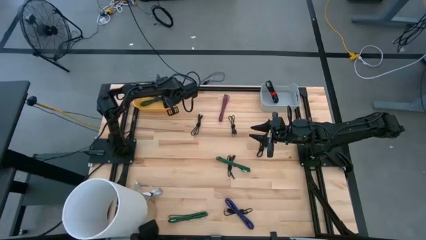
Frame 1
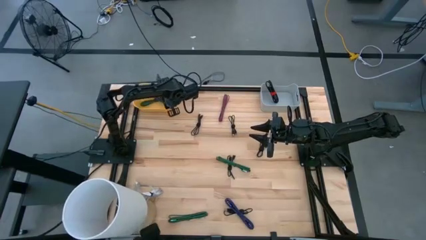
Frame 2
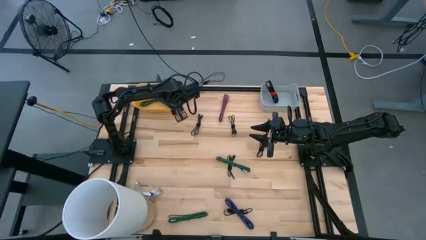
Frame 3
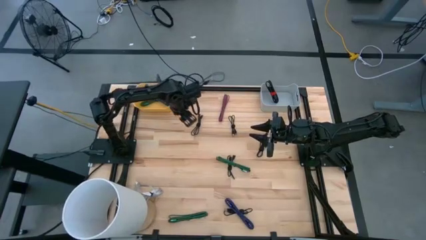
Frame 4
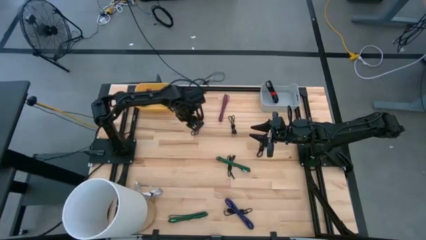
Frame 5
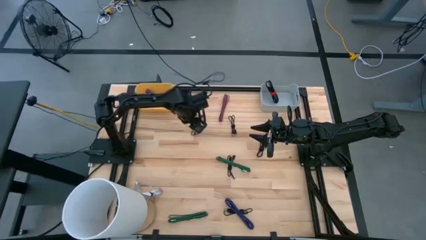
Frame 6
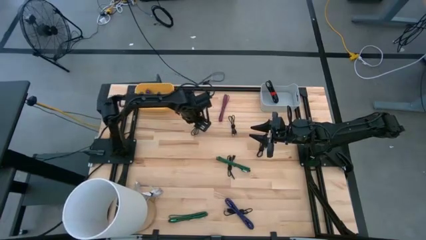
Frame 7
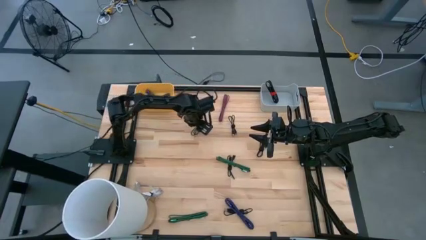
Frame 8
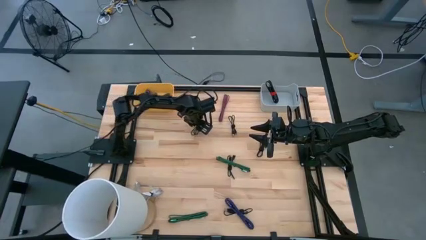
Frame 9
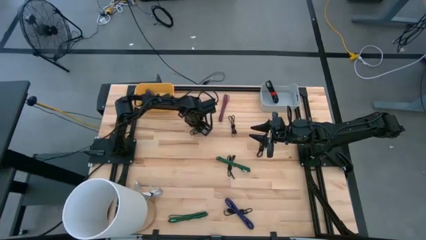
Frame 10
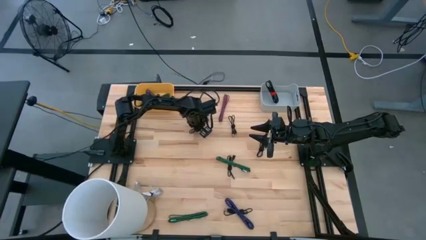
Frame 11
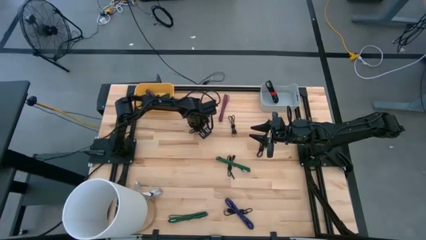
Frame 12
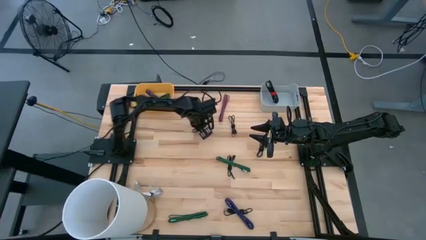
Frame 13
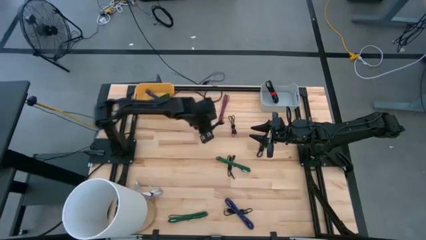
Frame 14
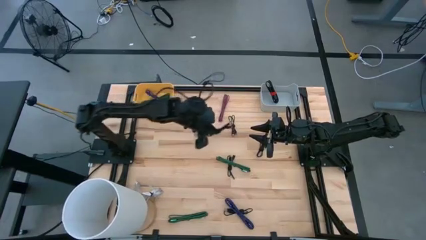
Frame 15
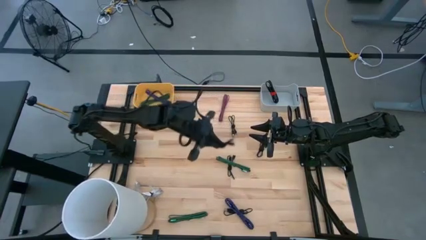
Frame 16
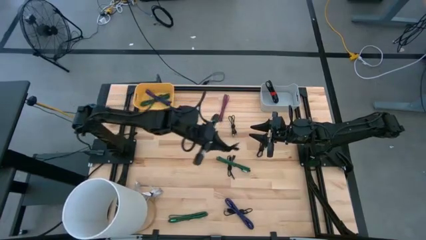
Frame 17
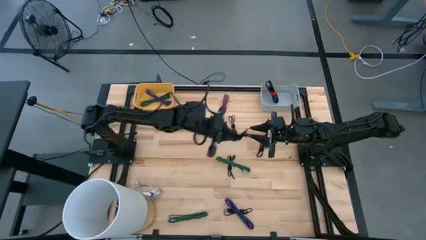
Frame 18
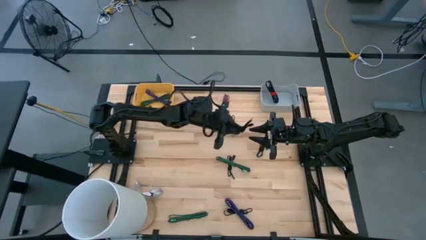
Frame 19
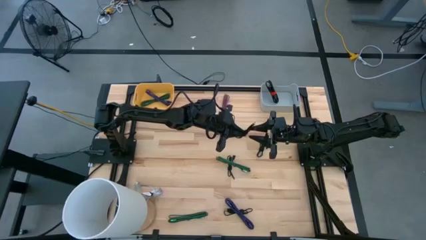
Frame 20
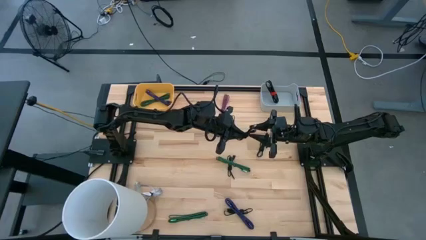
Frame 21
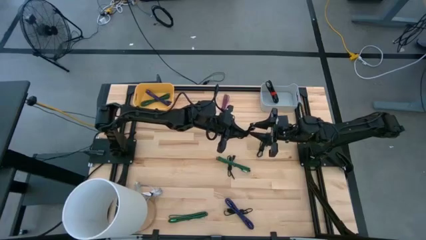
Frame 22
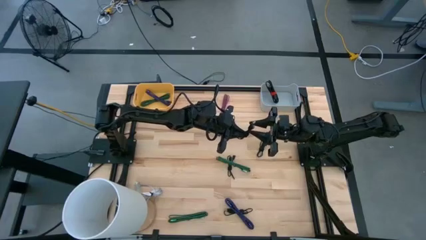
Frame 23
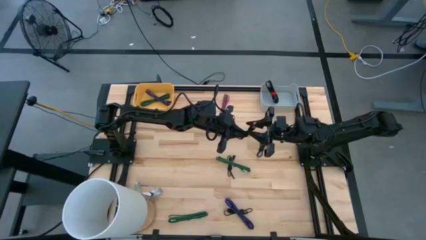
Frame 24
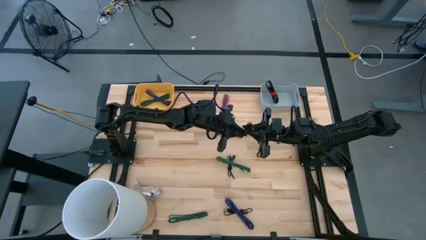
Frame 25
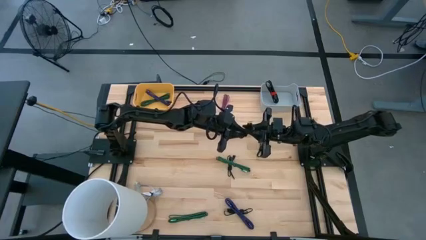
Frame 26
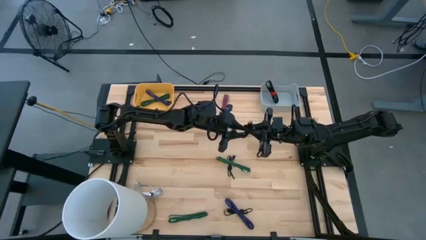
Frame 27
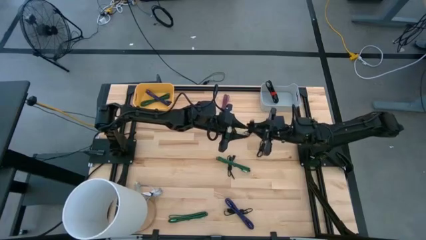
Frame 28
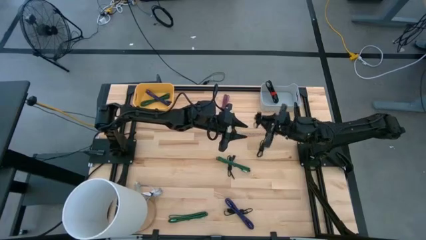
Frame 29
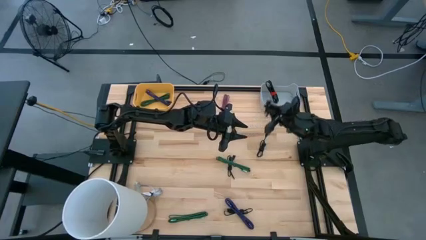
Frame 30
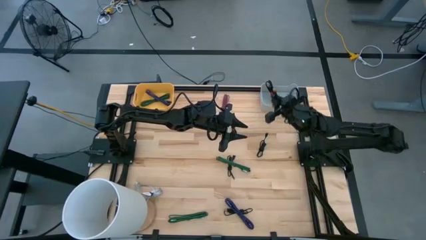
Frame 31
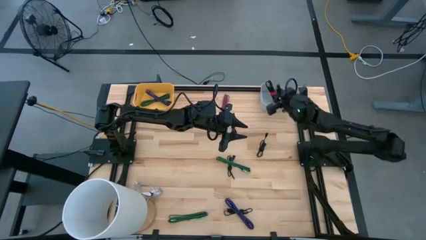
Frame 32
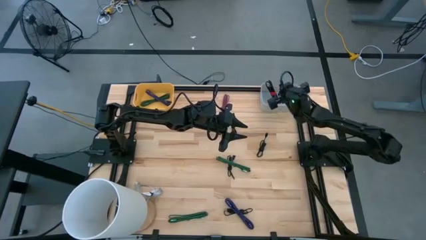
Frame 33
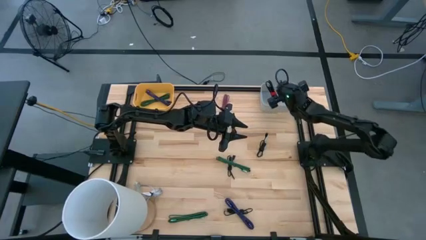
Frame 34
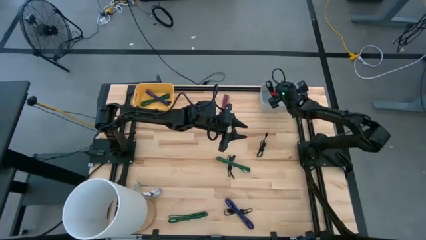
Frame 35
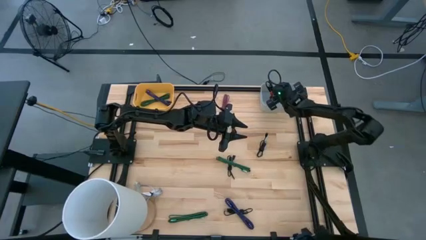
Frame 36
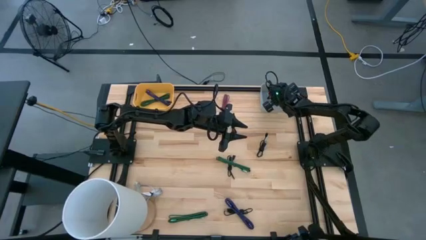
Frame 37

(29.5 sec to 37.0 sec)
Task: Pick & Place USB Port
Put the black charger cable into the gray bin

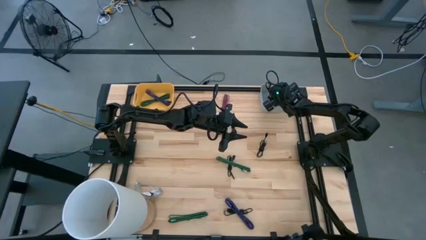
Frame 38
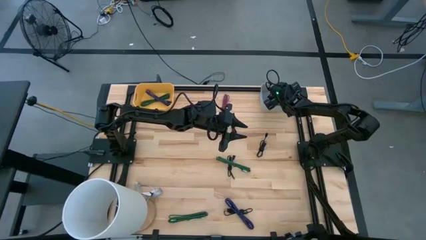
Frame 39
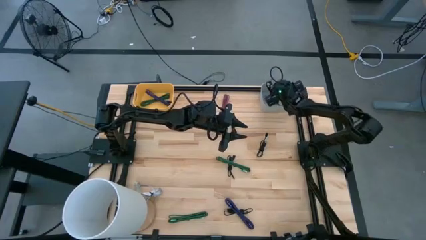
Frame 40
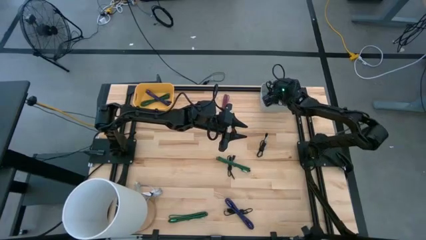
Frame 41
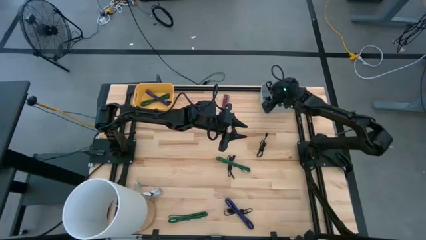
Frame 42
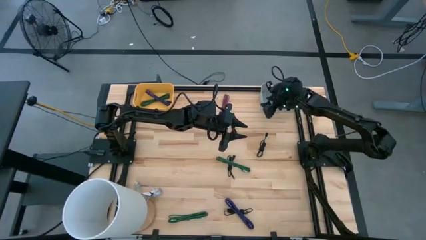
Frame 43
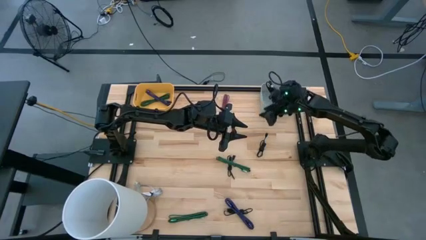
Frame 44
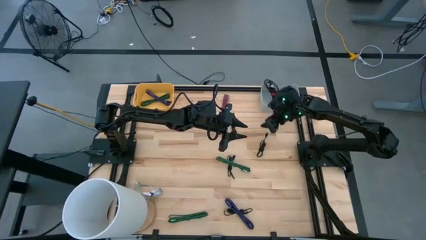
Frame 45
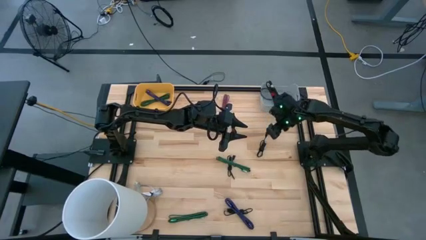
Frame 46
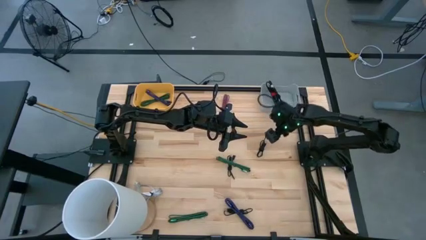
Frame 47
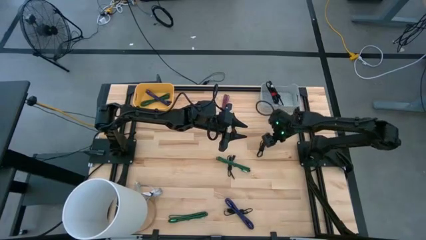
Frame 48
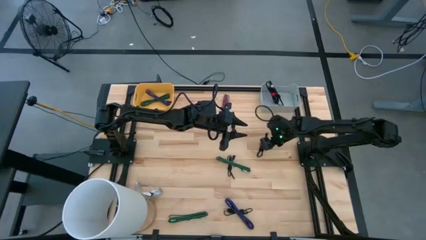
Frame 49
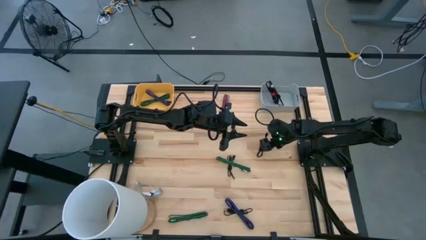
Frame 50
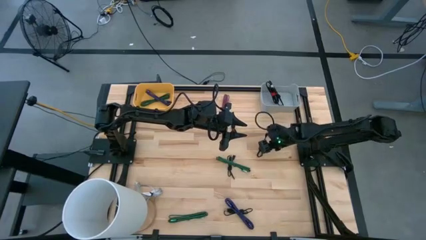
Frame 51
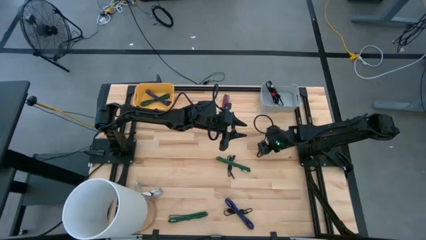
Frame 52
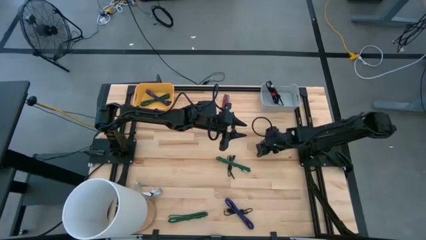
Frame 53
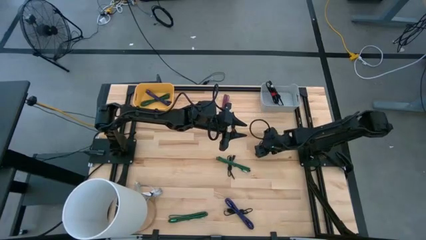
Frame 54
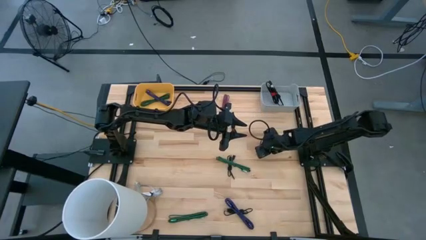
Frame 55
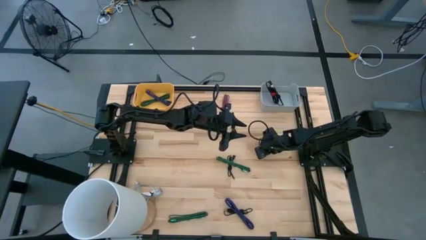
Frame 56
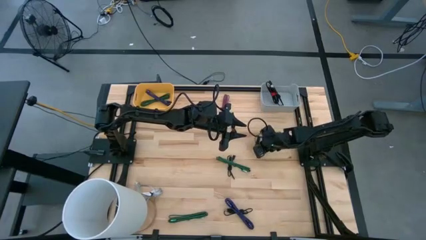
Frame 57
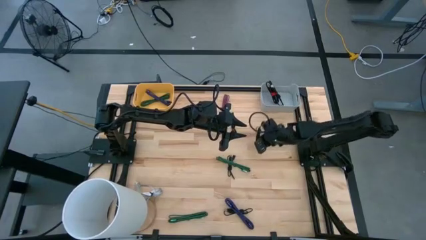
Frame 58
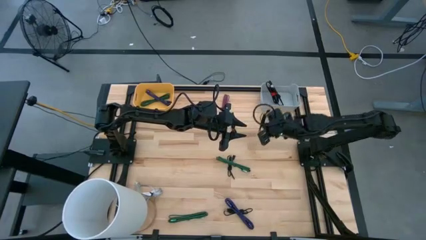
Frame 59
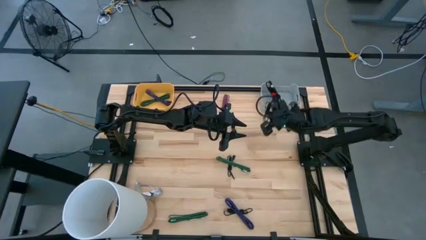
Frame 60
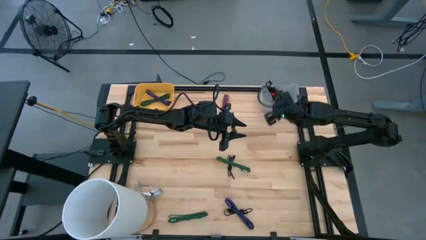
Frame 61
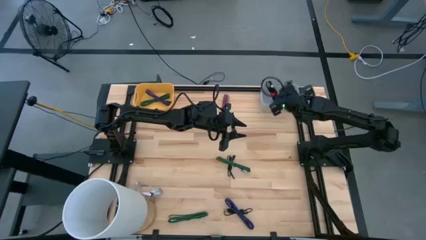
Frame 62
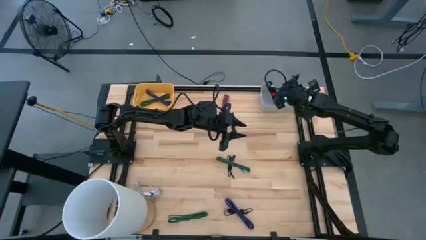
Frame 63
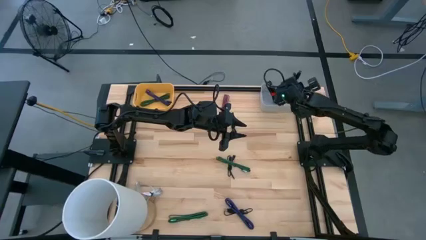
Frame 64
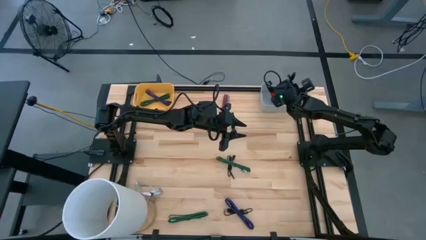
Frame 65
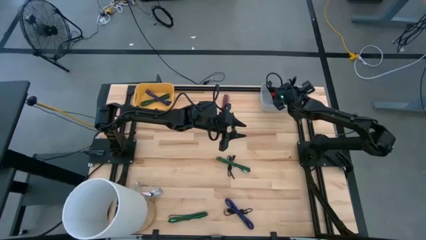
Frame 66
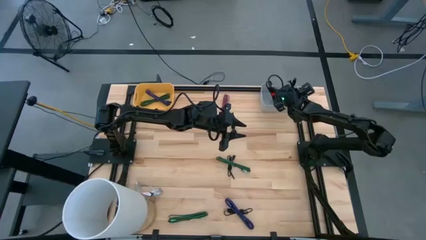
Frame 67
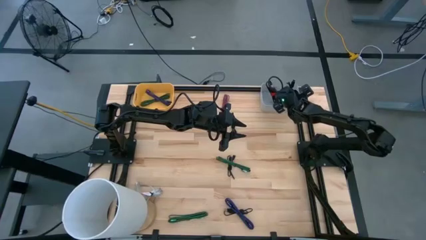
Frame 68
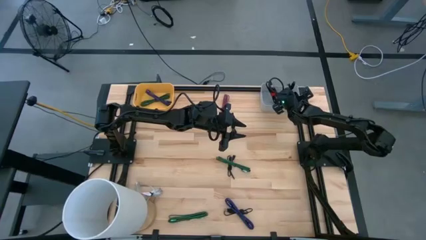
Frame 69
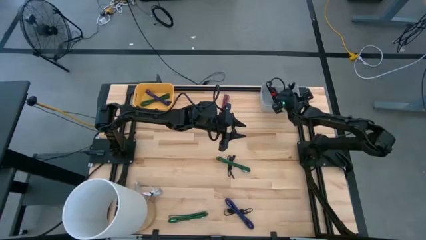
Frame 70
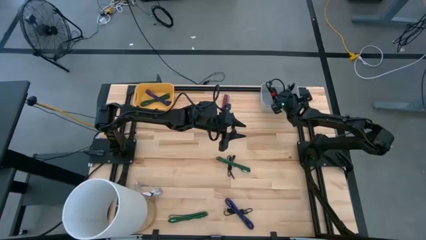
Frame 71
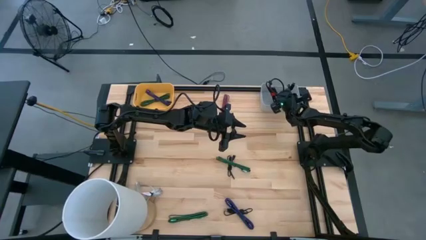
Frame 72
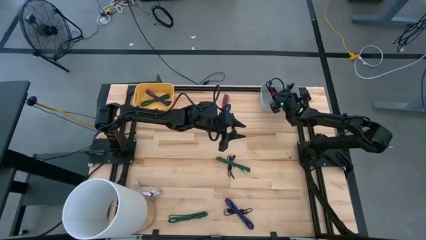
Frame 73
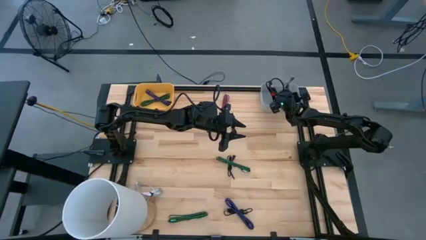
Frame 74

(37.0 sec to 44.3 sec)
Put the black charger cable into the gray bin
